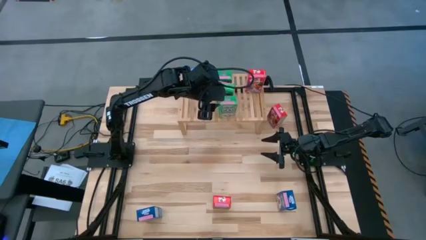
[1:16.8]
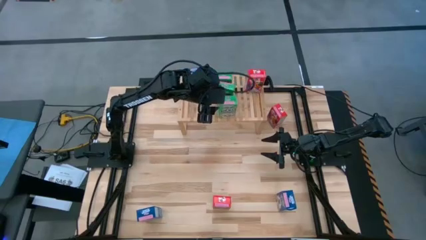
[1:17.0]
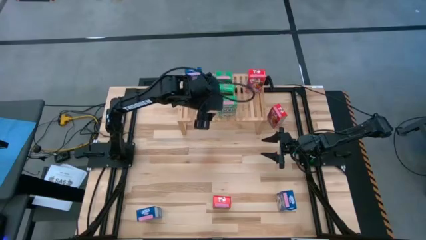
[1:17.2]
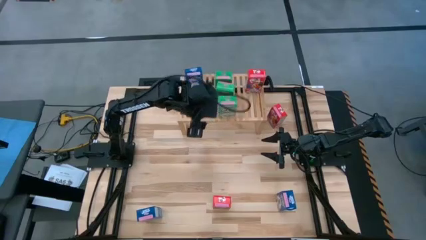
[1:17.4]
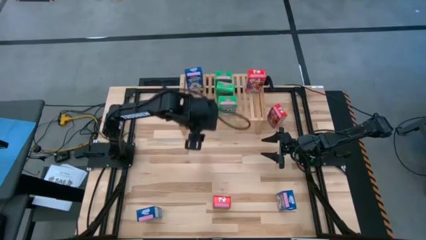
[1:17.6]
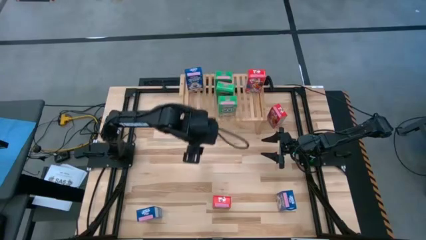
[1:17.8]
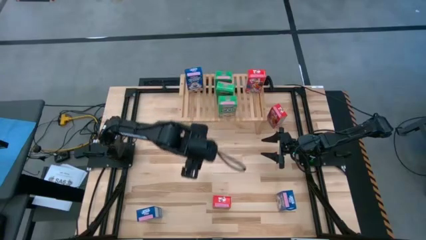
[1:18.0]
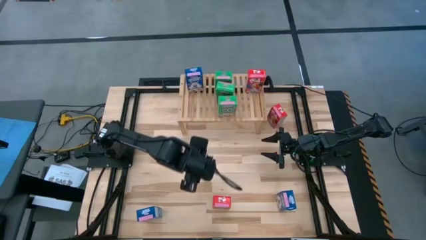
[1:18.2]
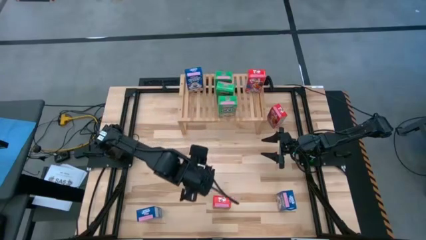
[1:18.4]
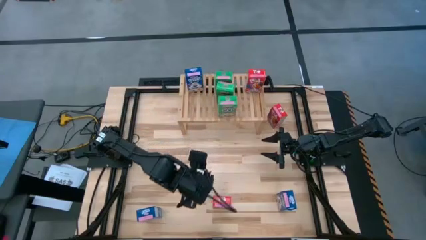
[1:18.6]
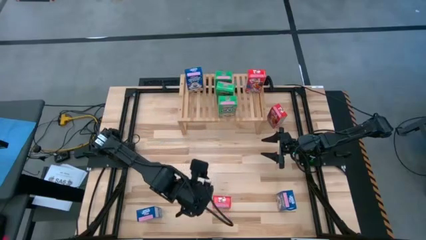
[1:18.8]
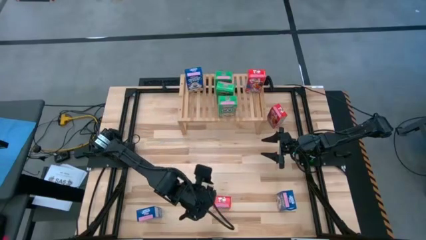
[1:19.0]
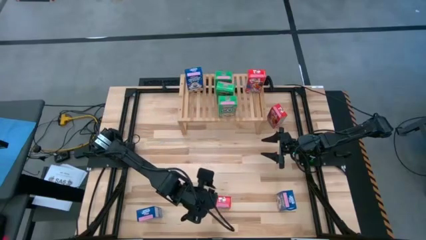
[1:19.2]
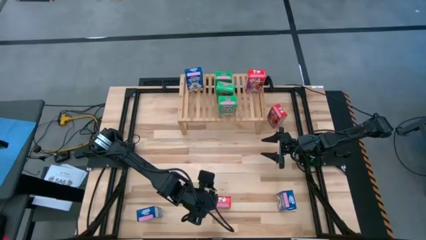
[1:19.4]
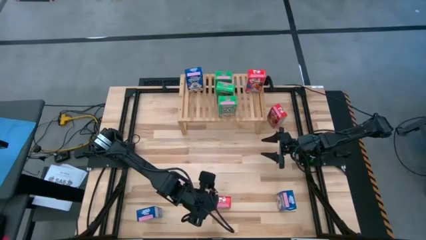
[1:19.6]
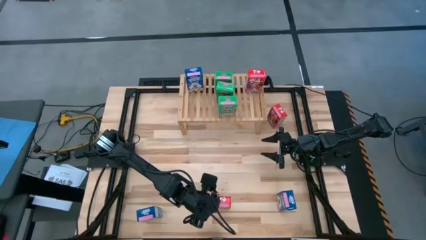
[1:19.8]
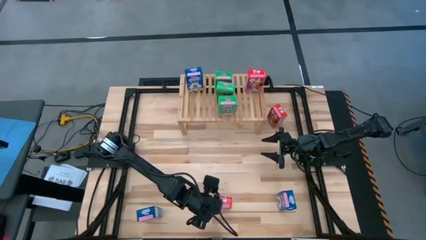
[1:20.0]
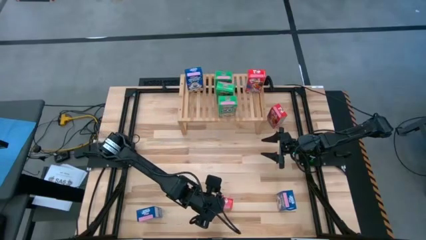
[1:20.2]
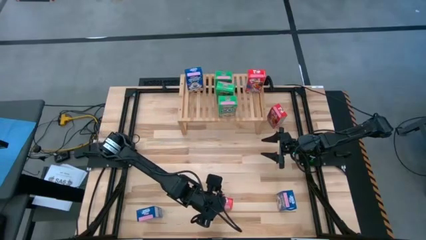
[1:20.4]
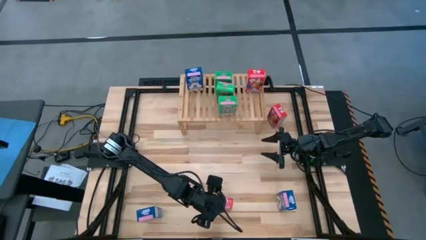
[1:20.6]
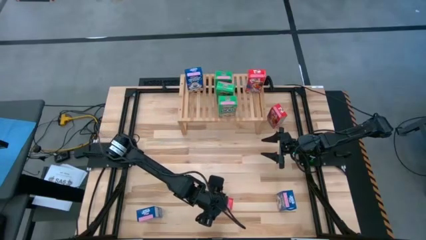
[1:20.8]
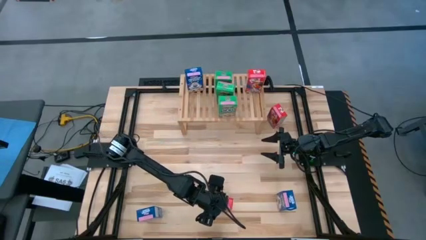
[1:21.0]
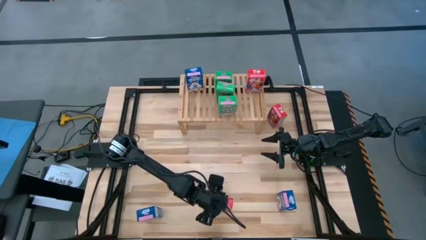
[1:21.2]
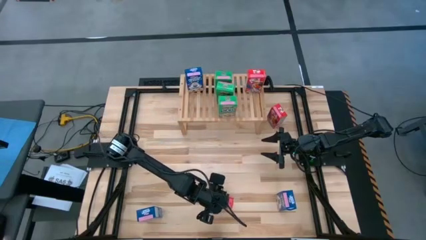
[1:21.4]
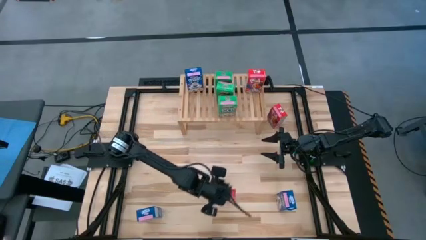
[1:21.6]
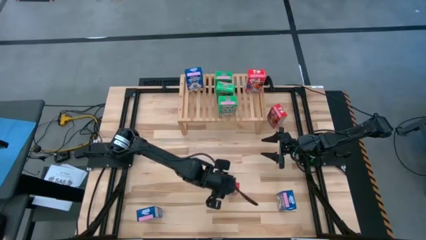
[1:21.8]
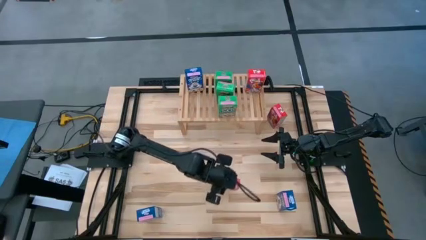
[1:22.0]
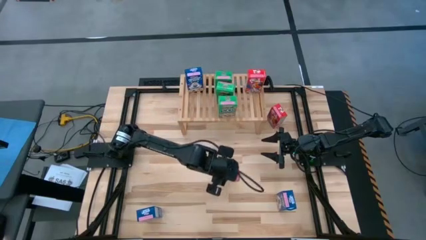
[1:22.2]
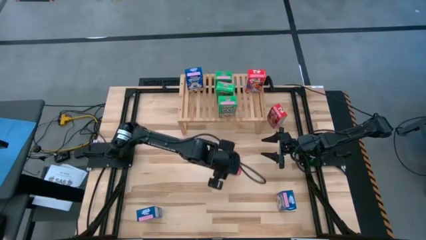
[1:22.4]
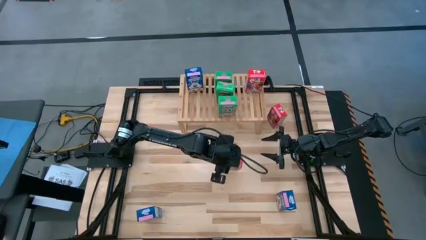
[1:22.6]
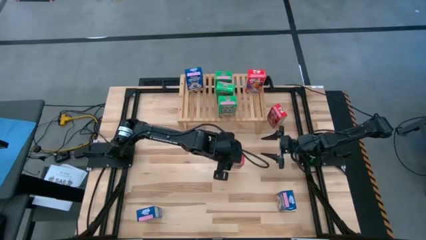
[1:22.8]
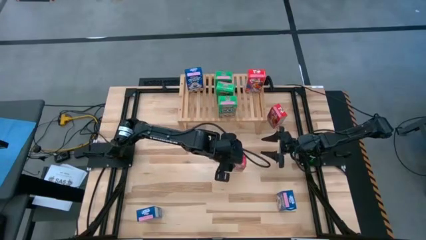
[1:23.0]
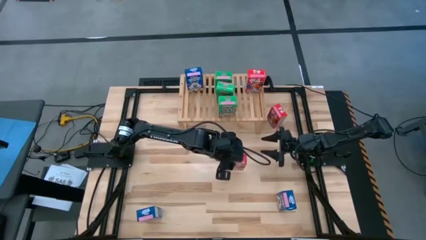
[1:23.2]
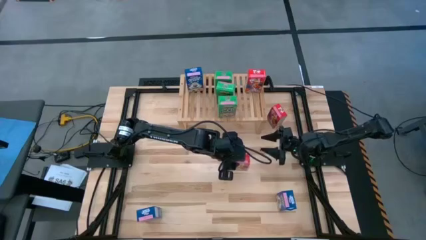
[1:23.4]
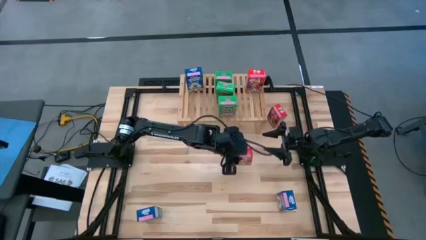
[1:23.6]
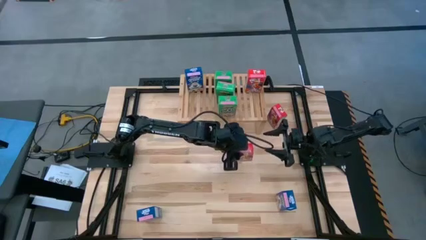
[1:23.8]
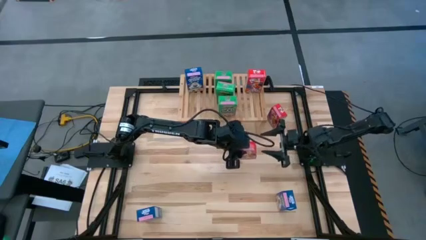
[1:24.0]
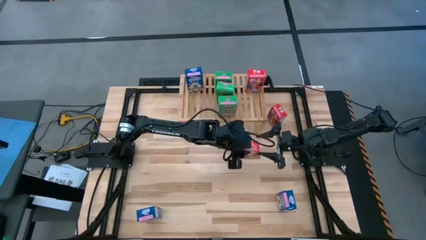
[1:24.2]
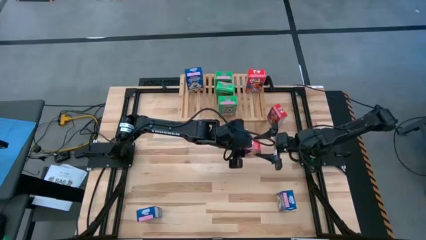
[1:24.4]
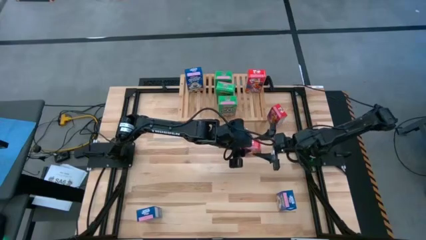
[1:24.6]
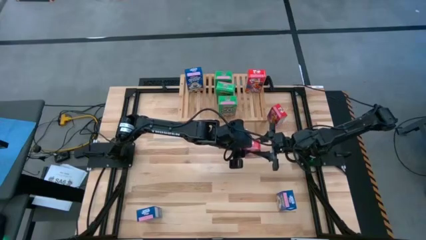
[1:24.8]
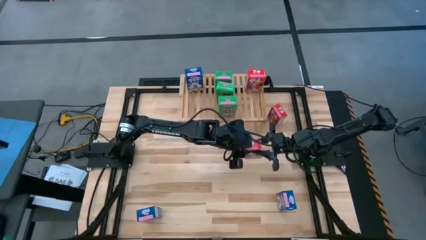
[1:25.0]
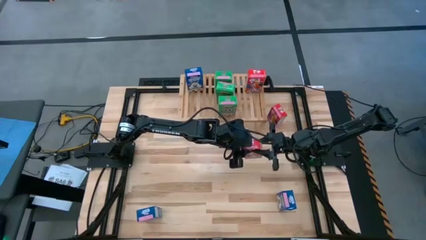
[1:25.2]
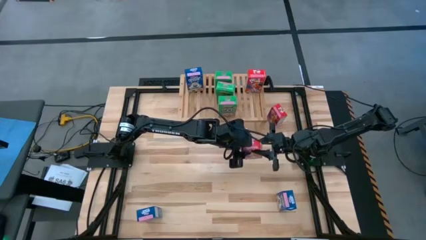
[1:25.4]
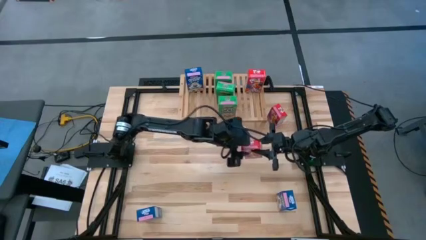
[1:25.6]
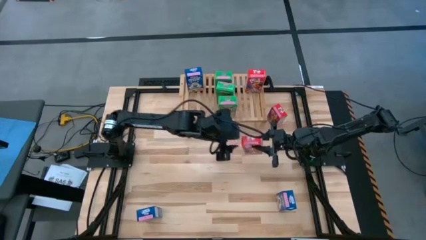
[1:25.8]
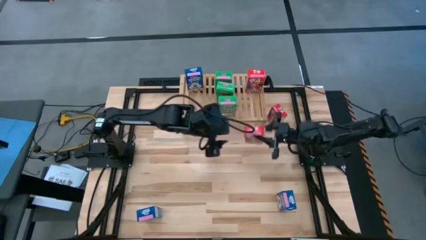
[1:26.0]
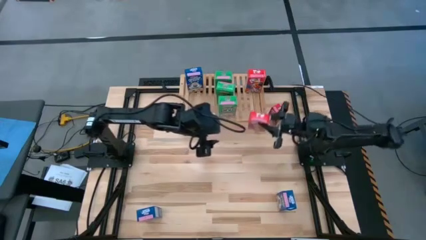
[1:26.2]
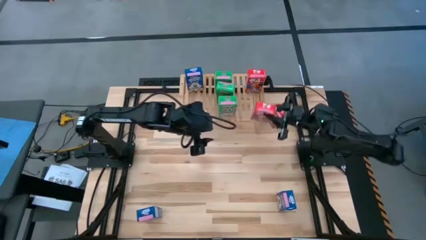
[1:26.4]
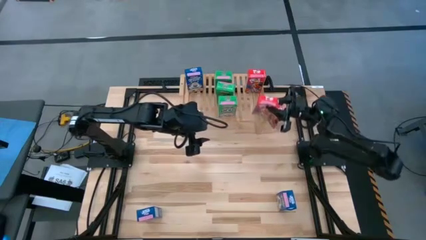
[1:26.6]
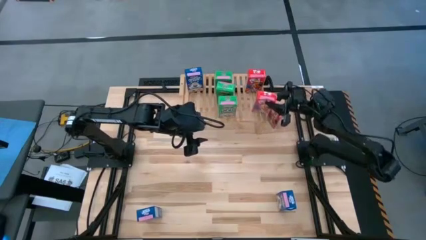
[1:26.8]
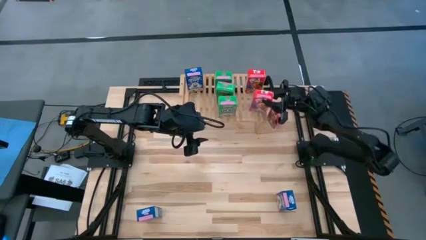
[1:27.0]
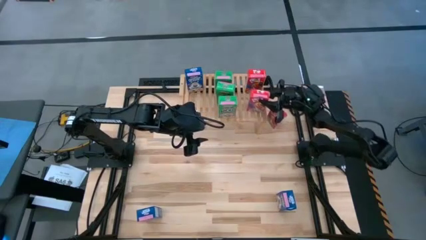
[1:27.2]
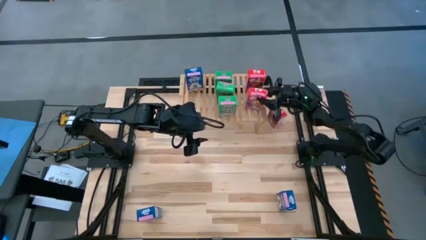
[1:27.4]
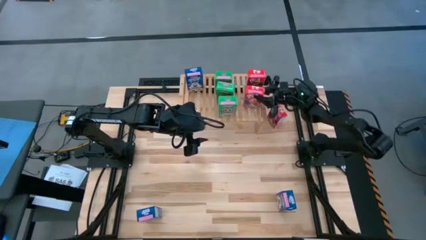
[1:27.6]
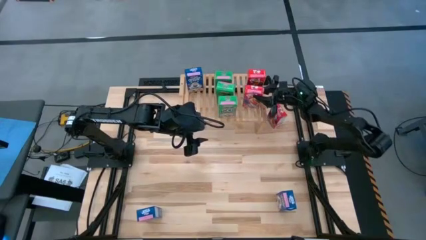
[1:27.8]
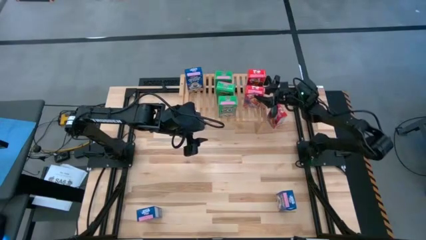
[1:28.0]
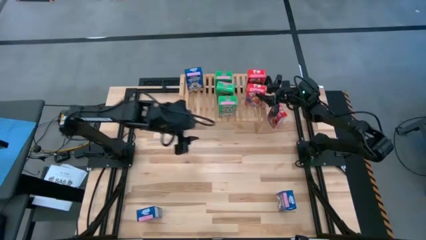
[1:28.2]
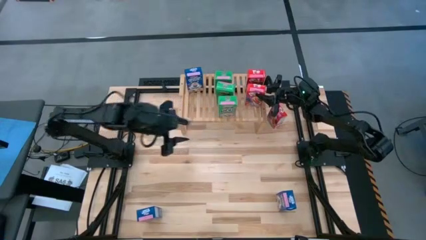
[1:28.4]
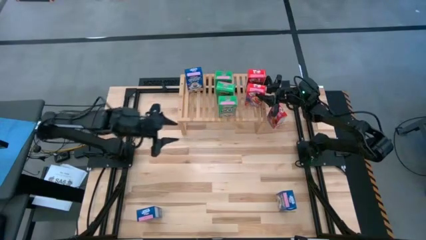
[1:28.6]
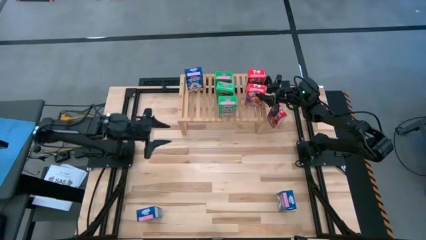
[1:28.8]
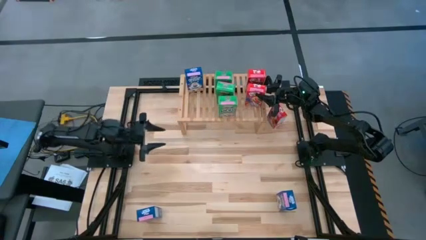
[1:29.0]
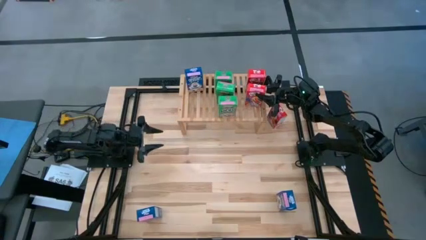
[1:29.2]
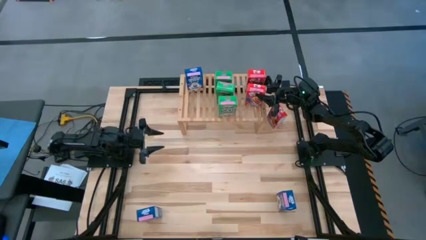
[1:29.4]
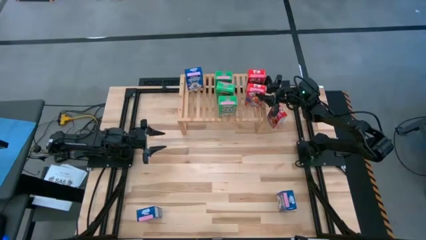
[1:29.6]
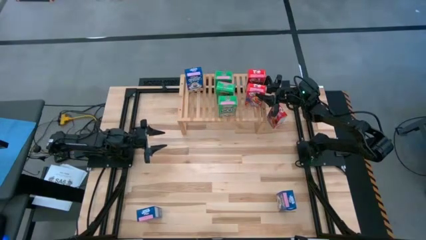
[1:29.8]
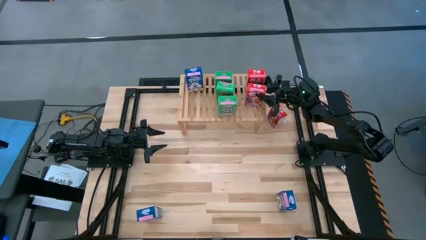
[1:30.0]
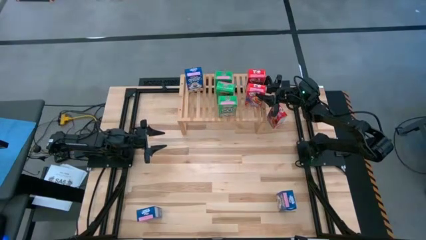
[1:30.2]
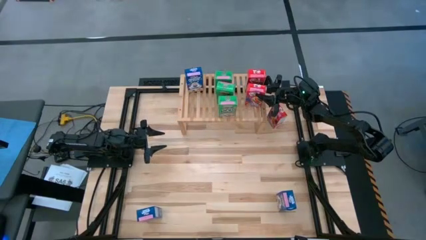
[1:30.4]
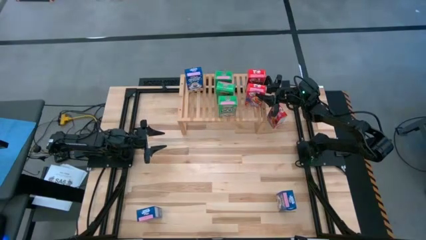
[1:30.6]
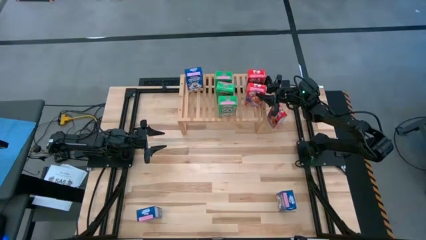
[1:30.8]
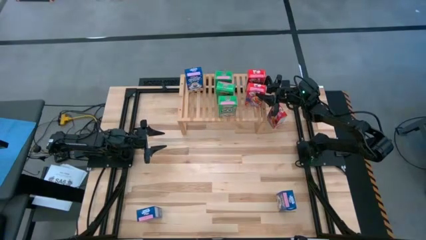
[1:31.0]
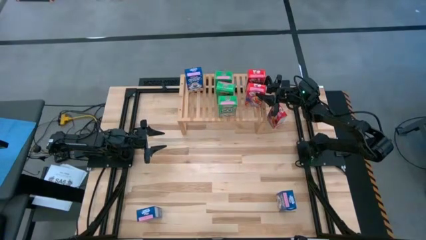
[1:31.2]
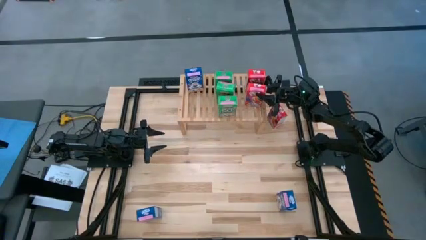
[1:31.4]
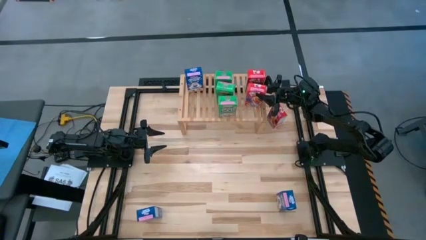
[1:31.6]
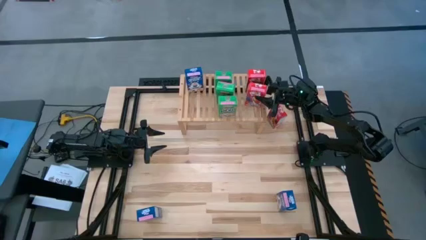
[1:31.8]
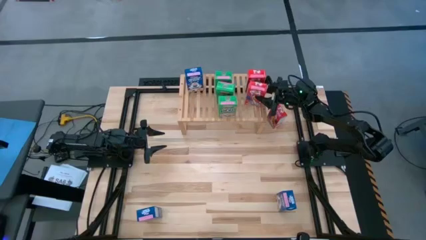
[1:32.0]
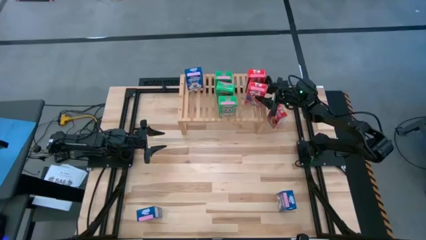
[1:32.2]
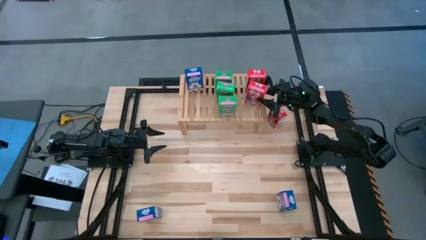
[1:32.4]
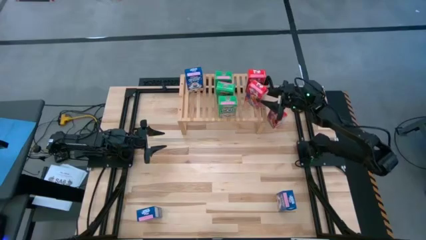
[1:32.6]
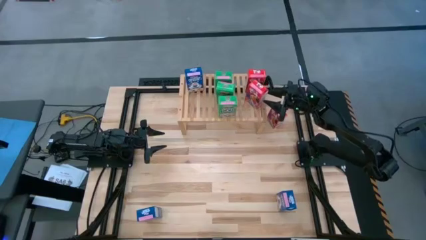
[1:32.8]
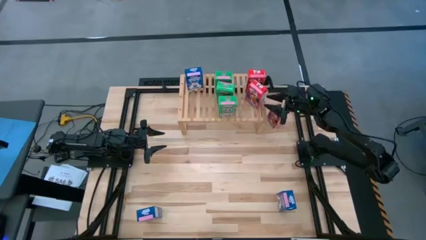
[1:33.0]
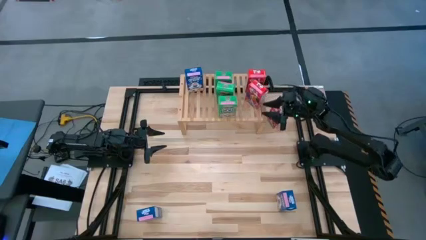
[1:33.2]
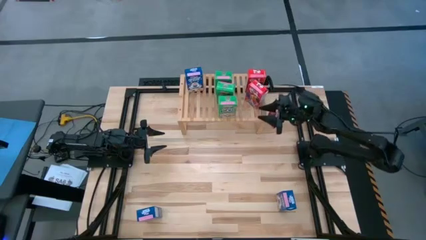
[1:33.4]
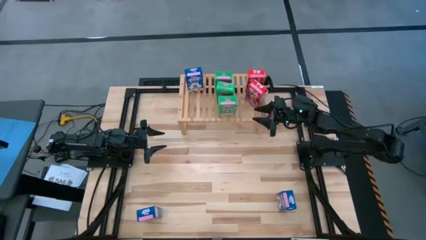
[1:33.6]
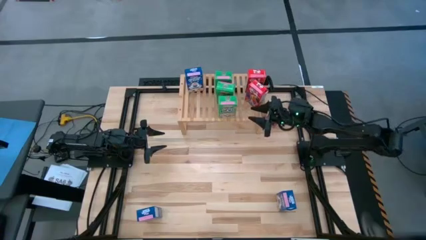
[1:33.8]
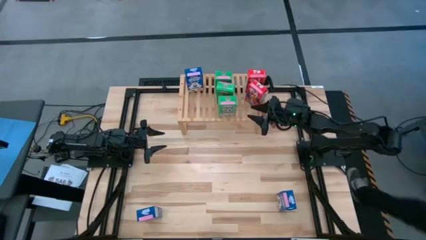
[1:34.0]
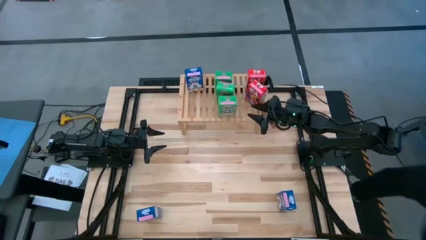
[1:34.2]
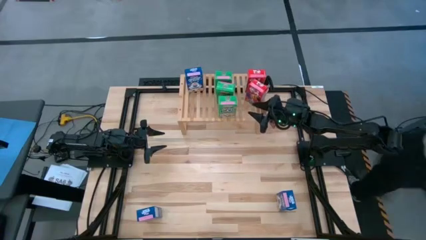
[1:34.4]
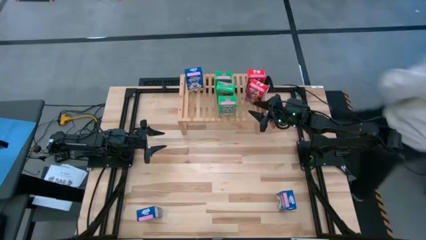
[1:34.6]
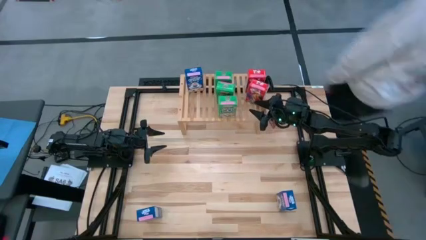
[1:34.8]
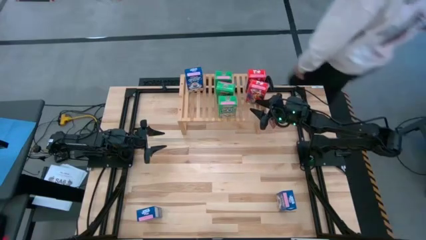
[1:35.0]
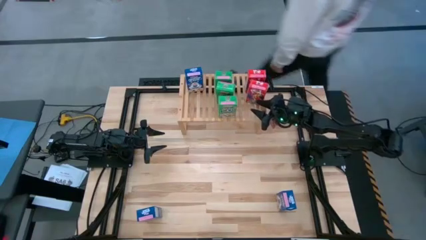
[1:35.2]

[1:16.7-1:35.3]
Task: Stack cereal on shelf
Put the bottom red cereal box on the shelf aligned with the other red cereal box
